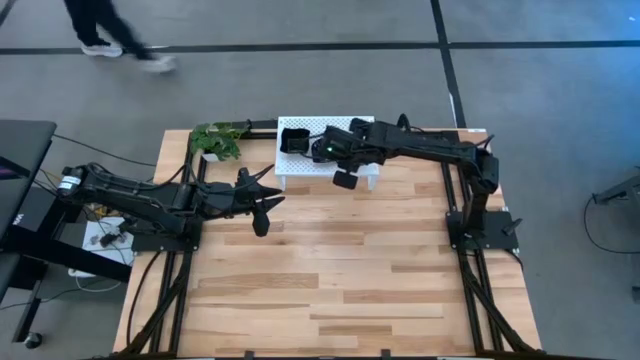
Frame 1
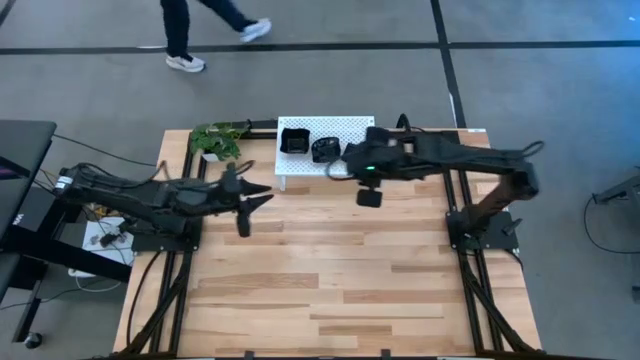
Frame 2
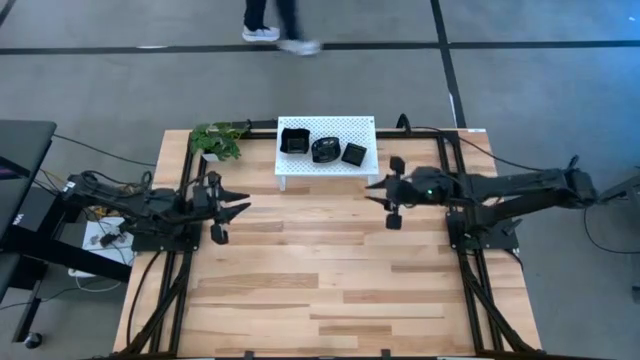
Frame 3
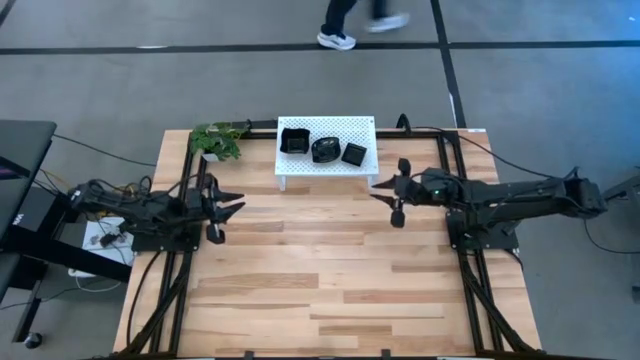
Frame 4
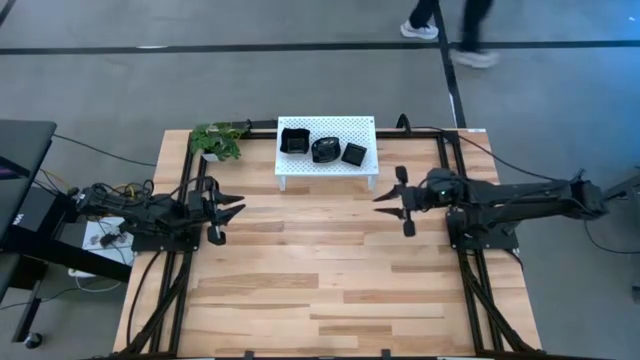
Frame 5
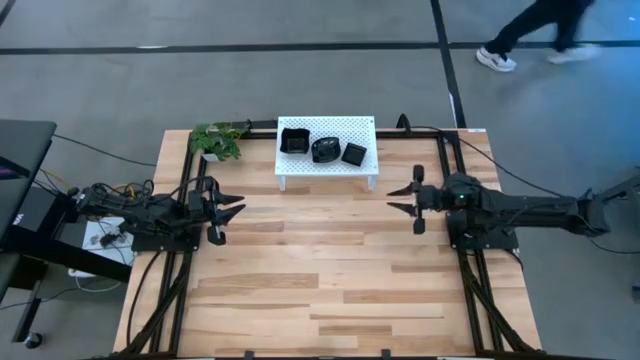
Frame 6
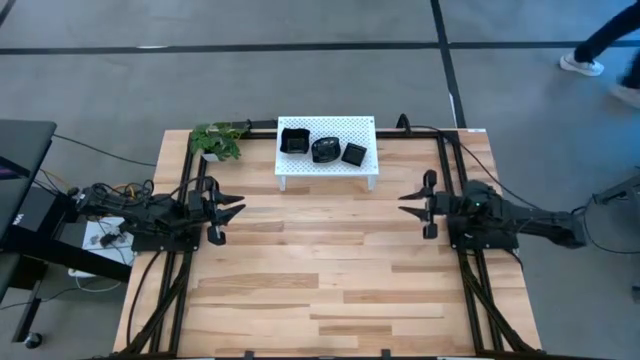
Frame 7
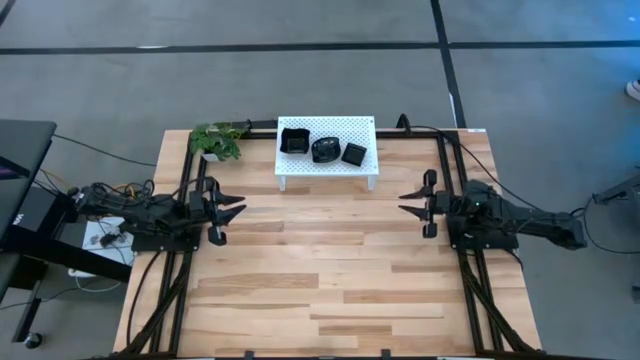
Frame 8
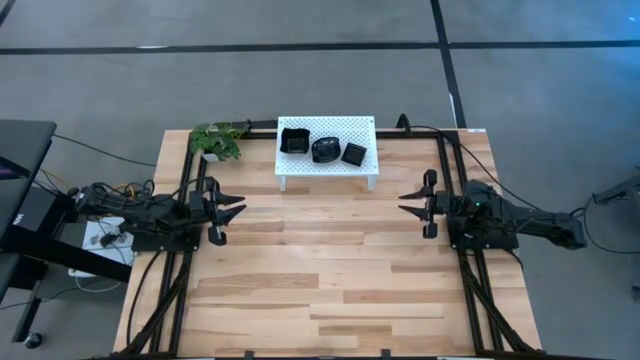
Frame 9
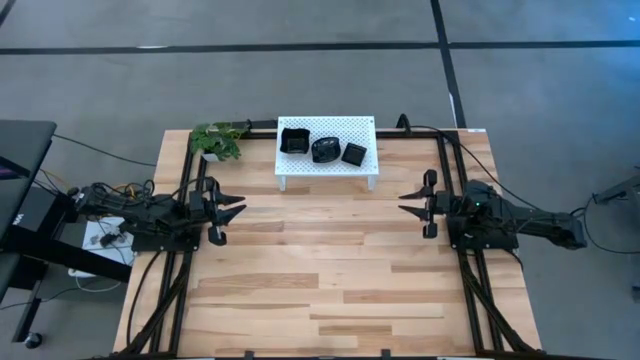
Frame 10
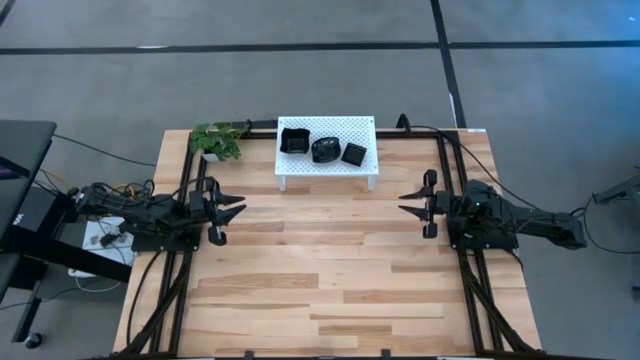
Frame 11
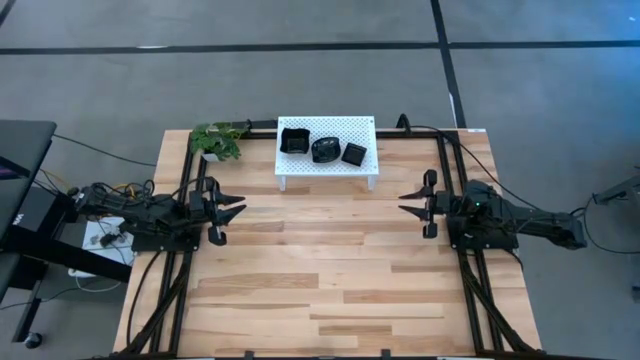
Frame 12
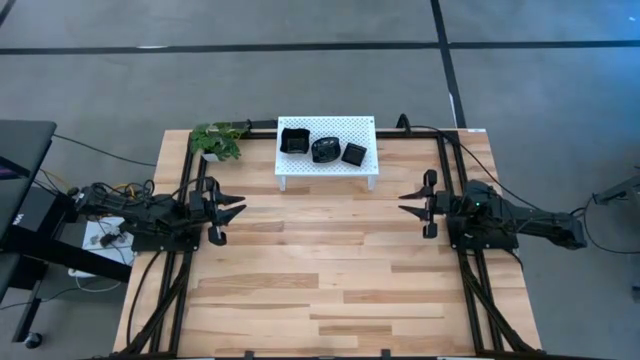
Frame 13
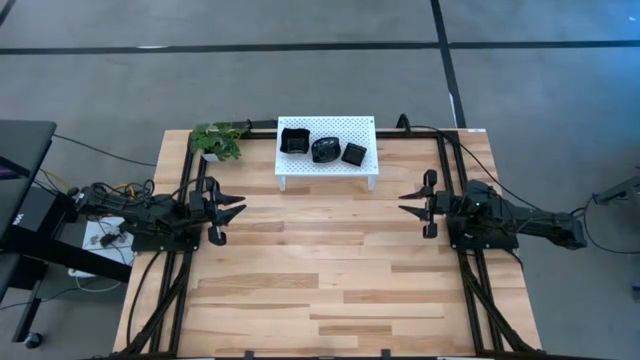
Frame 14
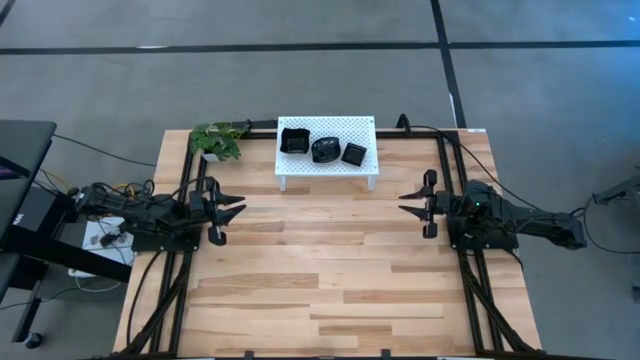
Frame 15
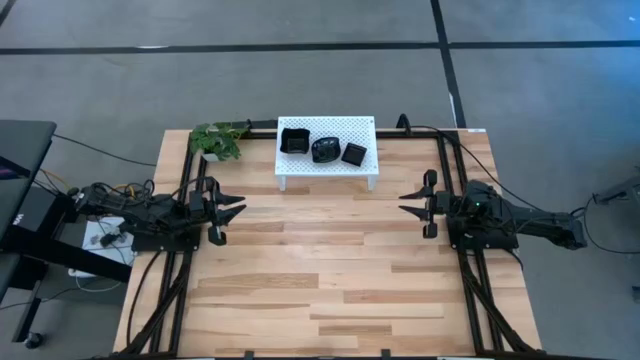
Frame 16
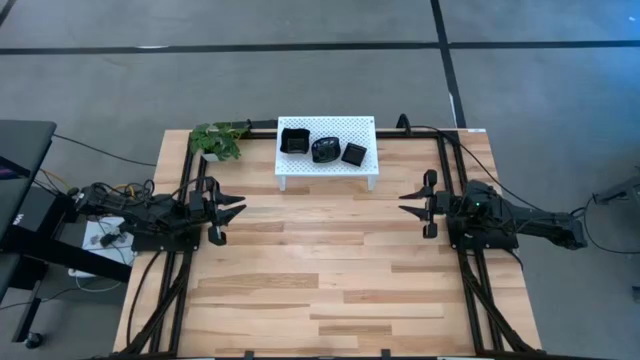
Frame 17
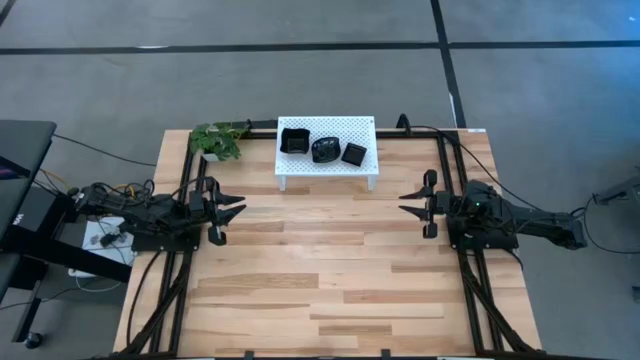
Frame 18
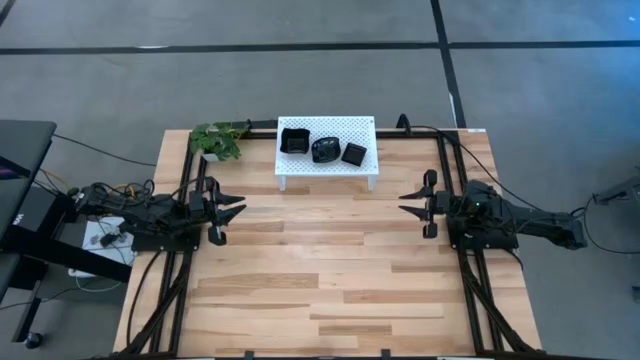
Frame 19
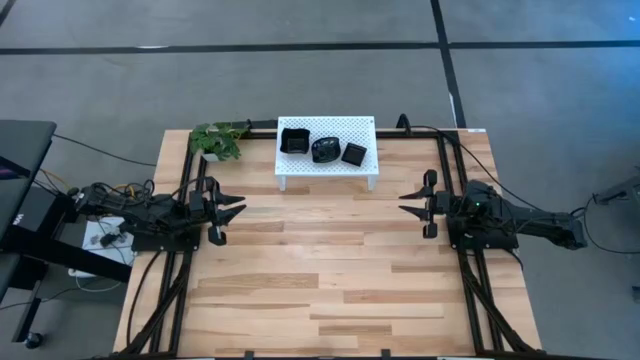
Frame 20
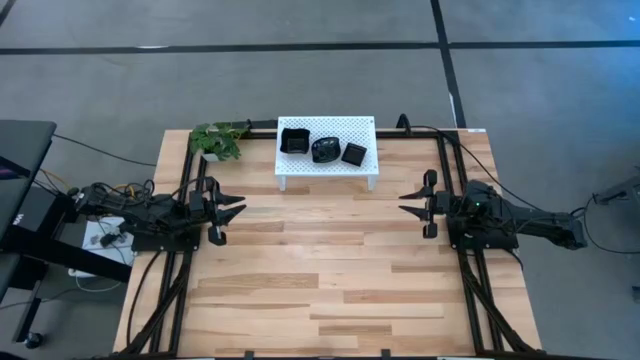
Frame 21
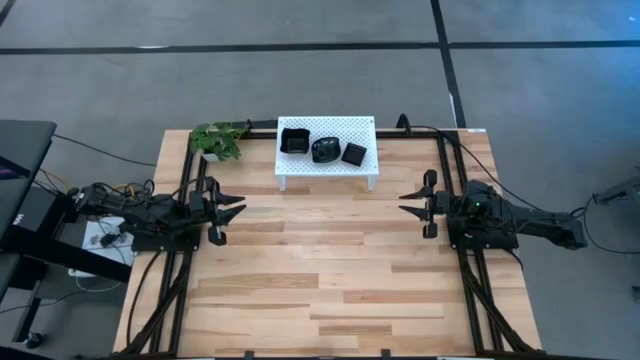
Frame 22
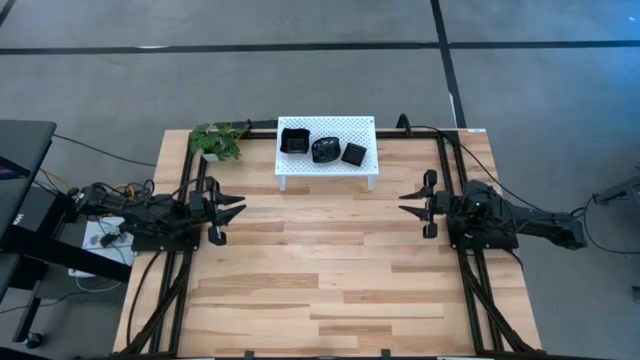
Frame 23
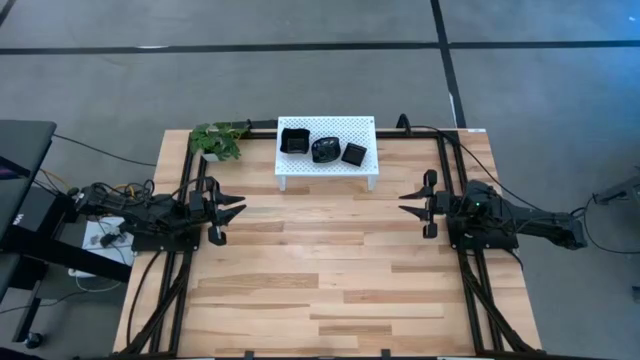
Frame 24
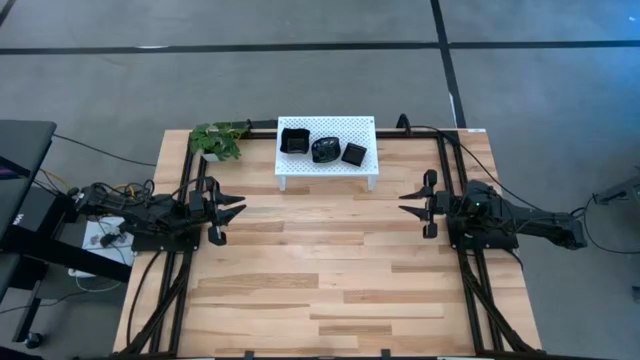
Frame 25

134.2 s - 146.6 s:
Task: Pick & Place Mini shaped plates
Return to Home Position

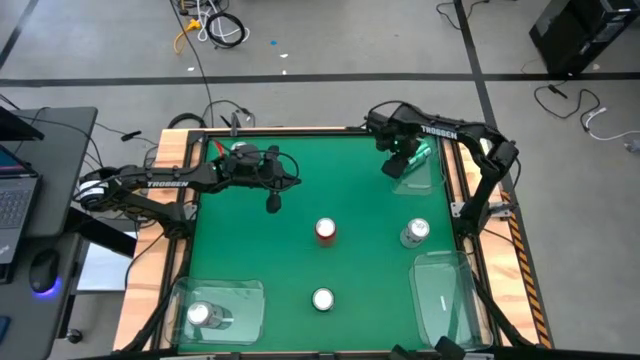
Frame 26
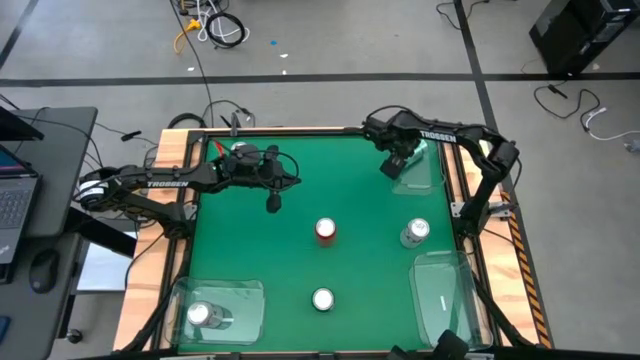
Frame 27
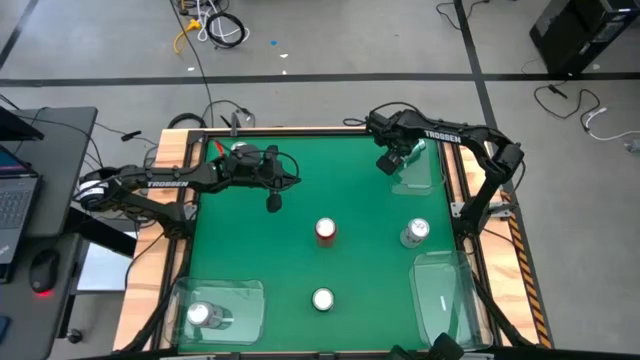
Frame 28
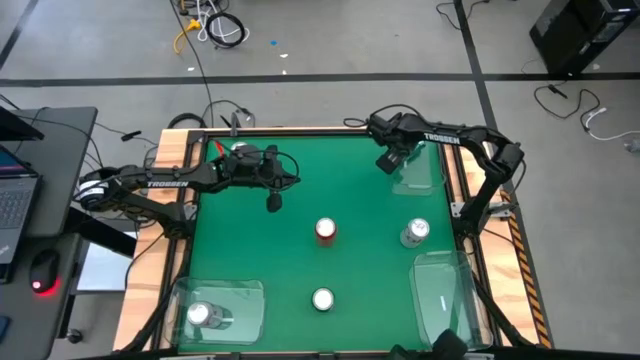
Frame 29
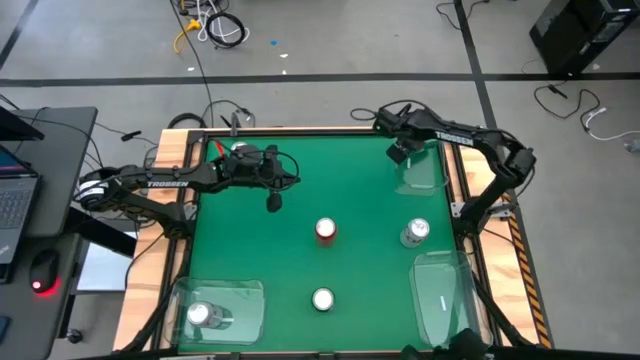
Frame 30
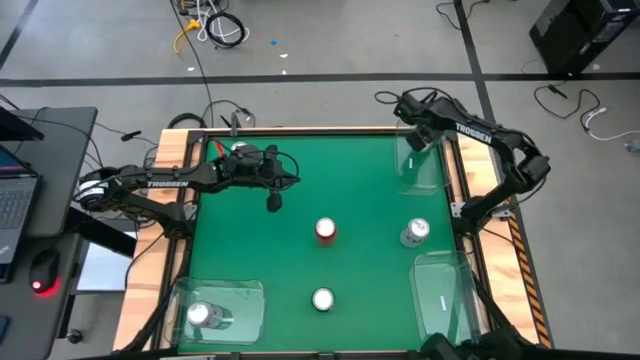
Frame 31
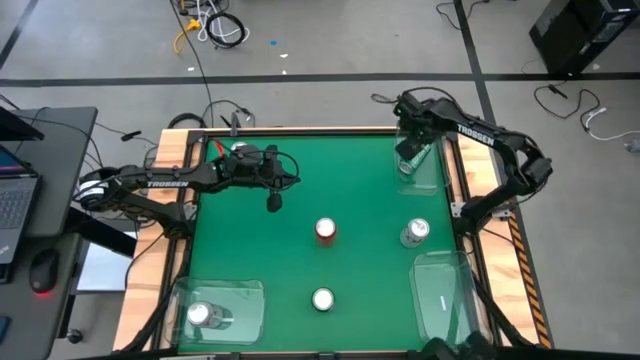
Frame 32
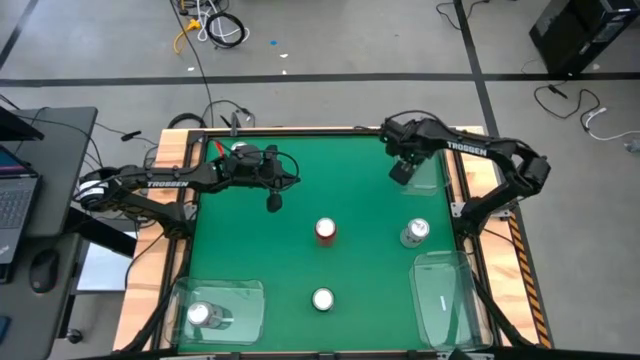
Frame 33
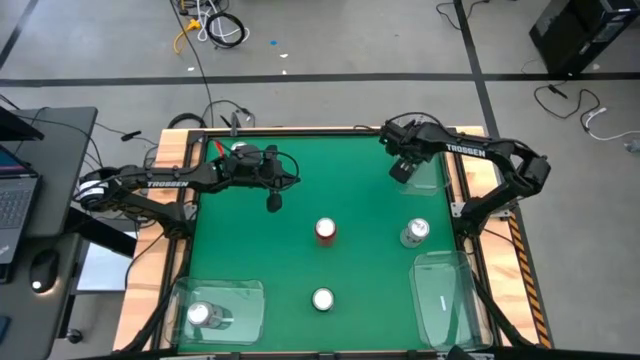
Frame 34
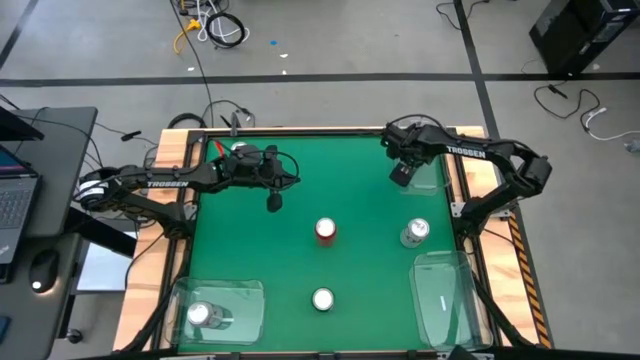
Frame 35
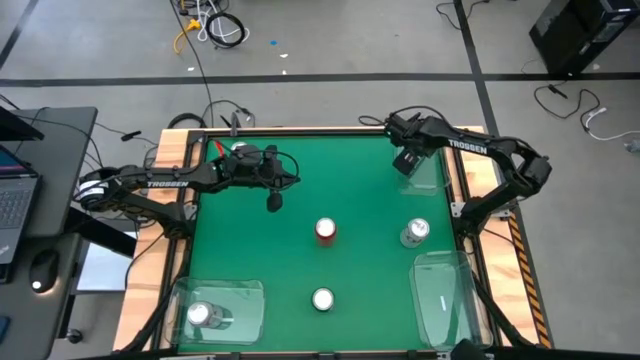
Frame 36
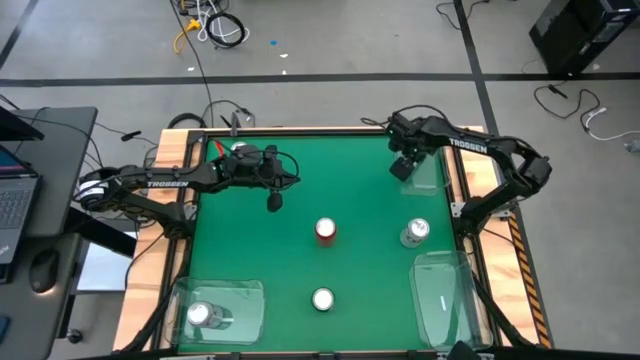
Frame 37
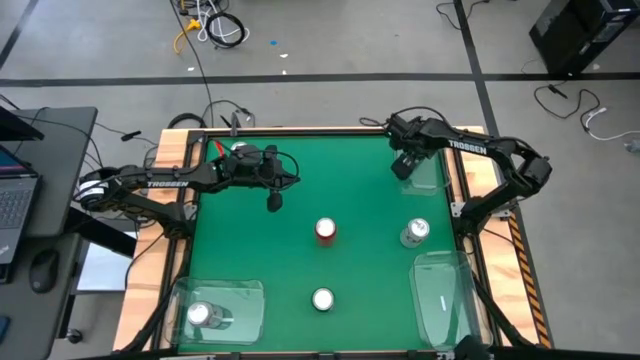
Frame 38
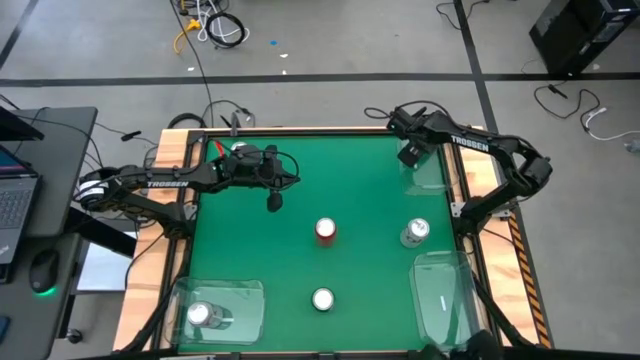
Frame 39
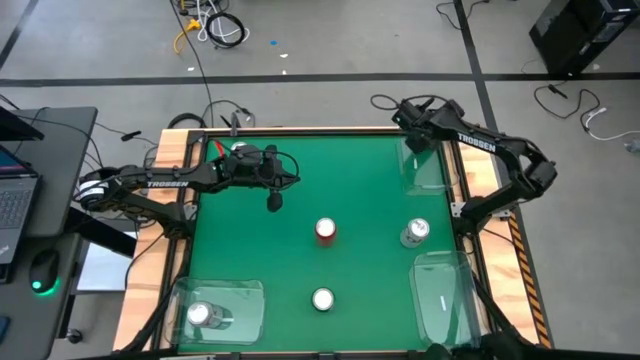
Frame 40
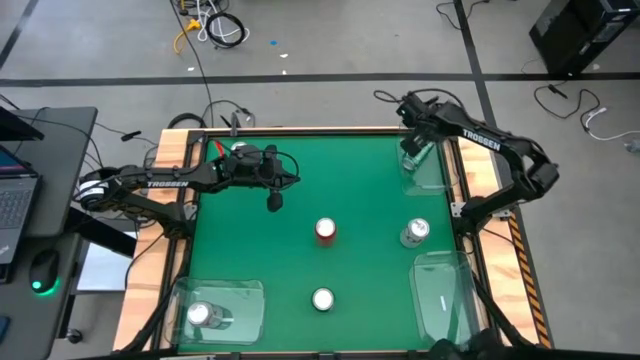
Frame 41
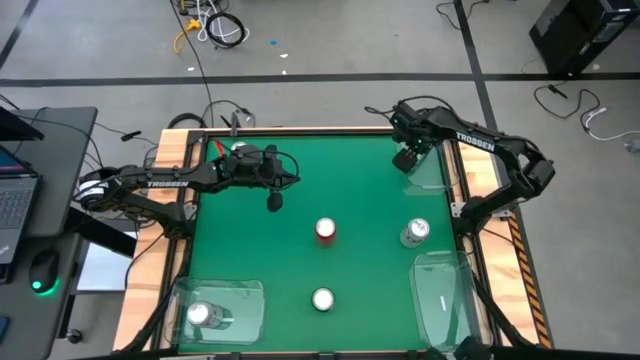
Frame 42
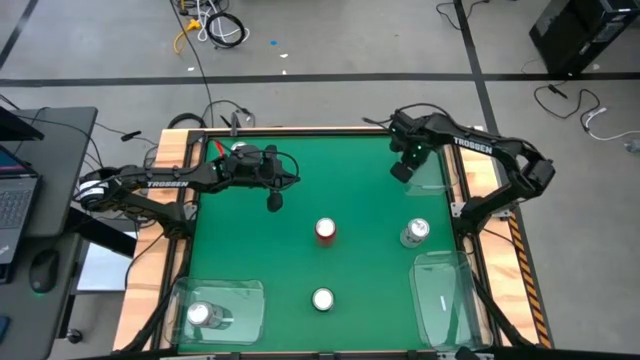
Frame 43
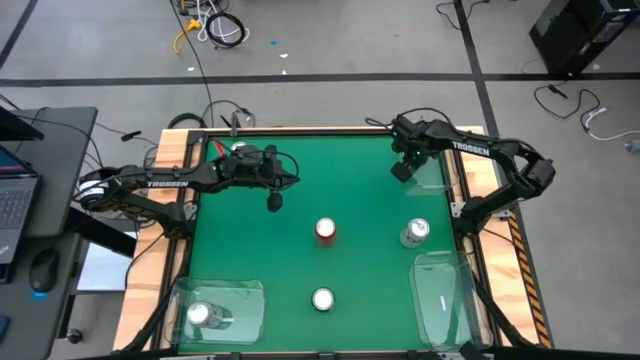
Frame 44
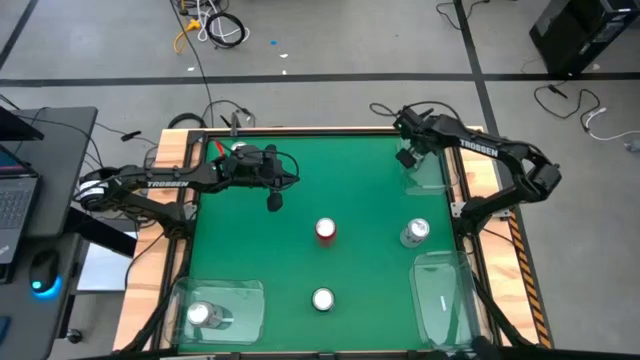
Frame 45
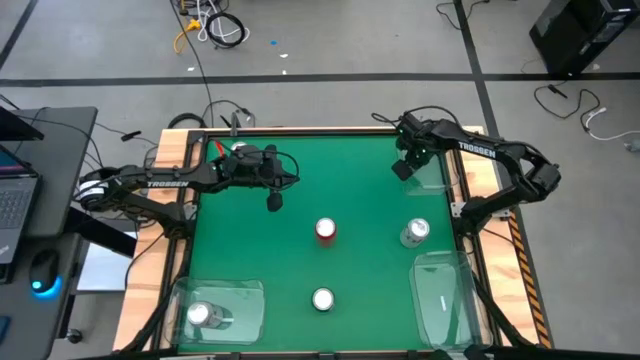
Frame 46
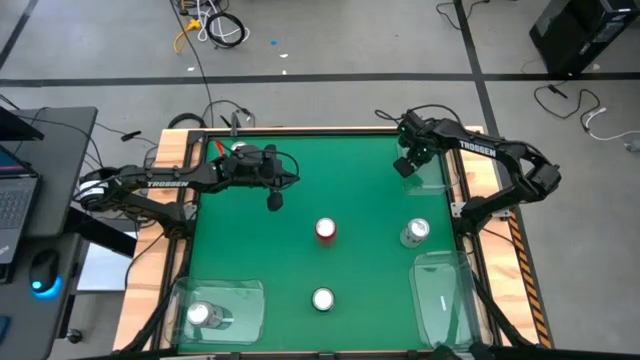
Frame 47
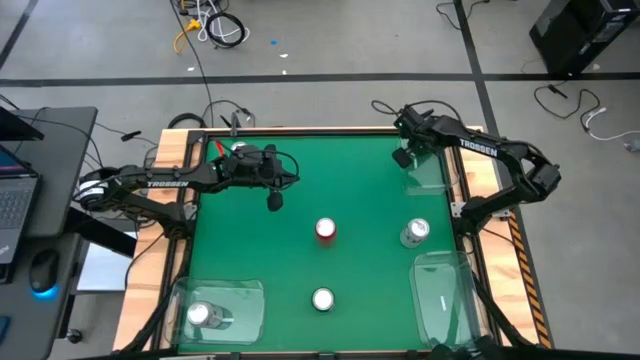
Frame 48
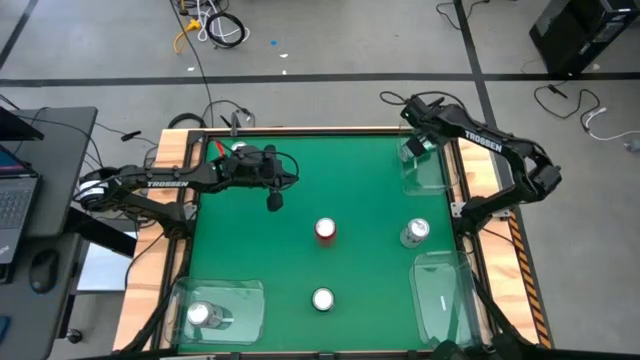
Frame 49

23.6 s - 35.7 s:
Task: Sort soda cans
Put the top green soda can into the top right transparent bin
